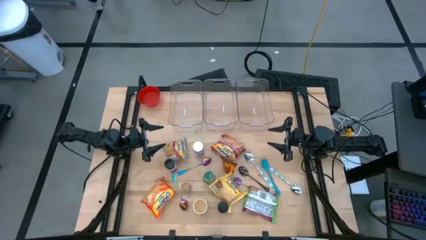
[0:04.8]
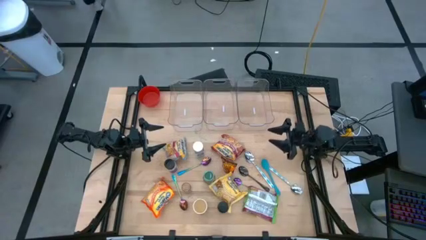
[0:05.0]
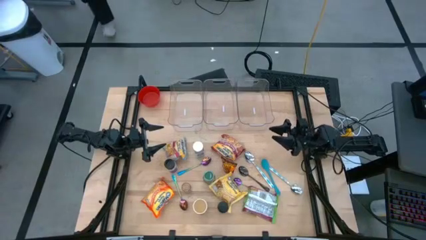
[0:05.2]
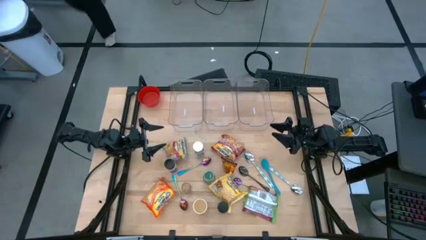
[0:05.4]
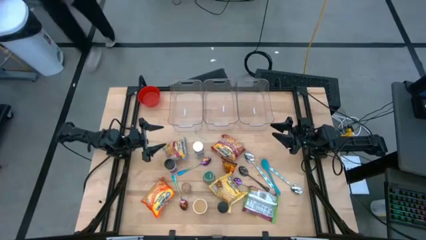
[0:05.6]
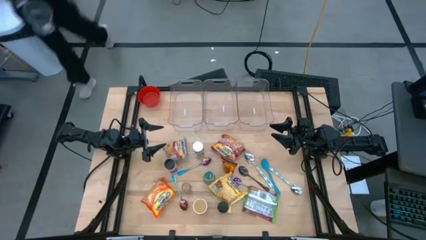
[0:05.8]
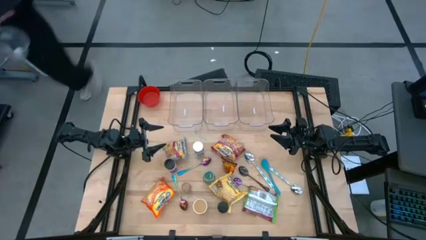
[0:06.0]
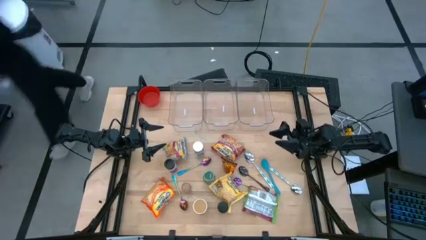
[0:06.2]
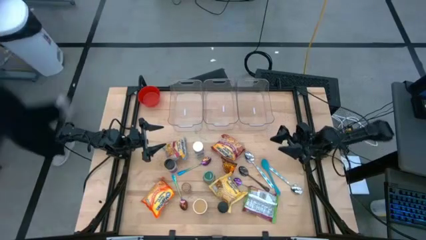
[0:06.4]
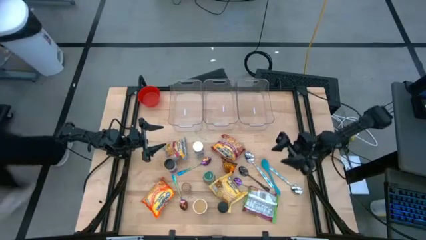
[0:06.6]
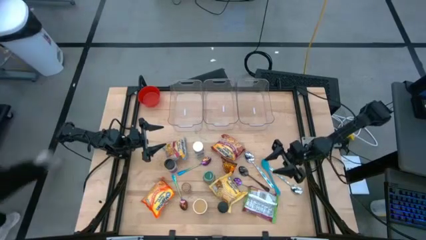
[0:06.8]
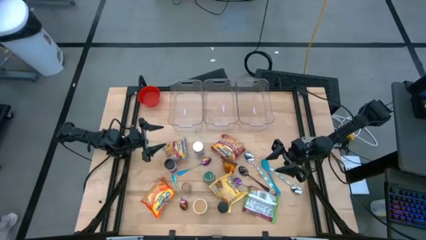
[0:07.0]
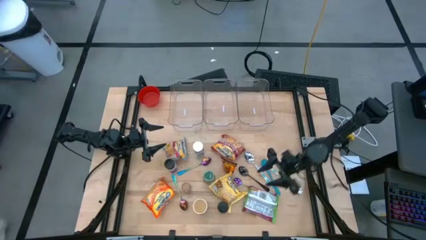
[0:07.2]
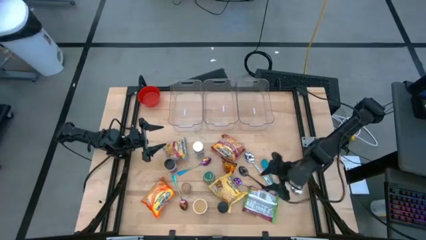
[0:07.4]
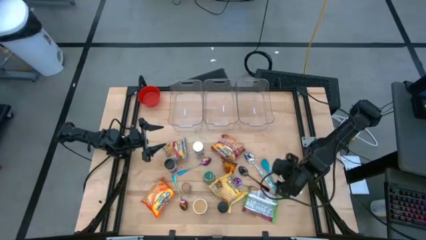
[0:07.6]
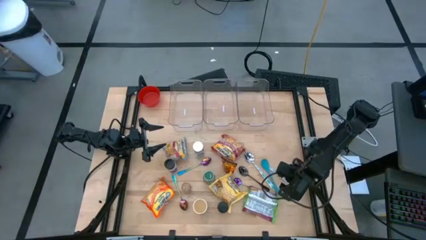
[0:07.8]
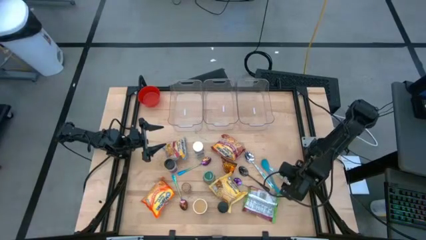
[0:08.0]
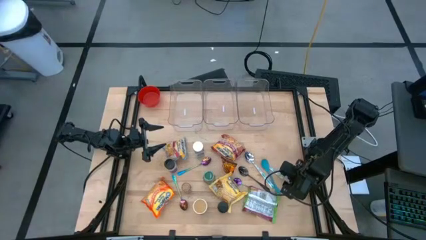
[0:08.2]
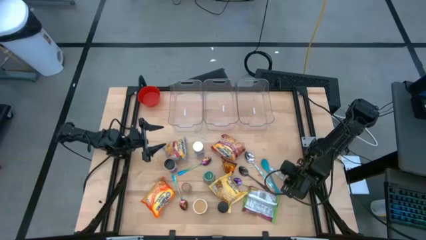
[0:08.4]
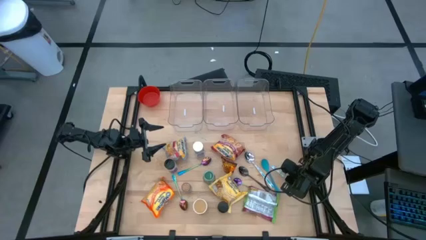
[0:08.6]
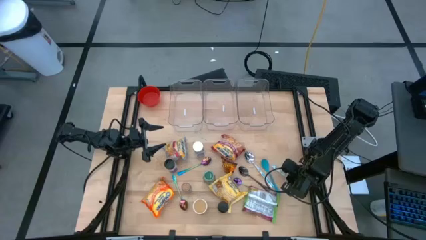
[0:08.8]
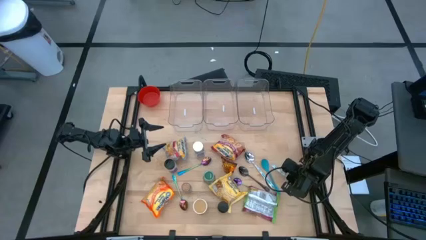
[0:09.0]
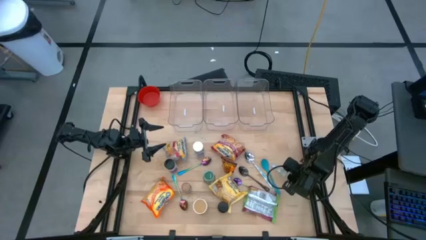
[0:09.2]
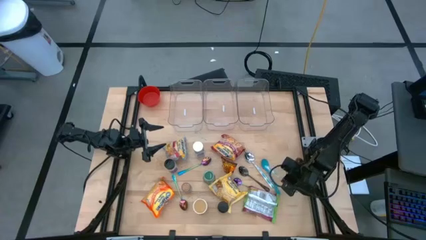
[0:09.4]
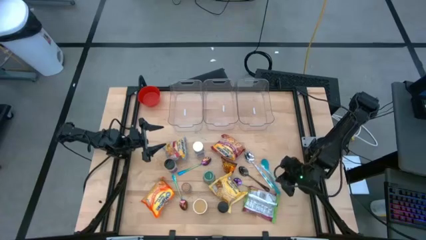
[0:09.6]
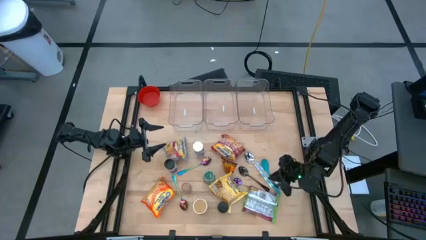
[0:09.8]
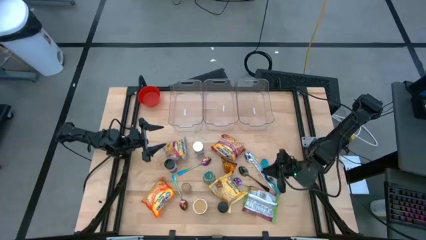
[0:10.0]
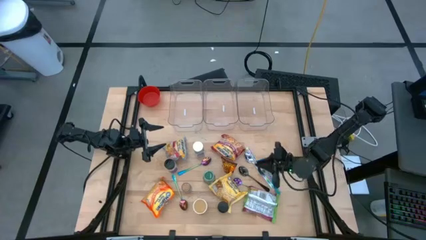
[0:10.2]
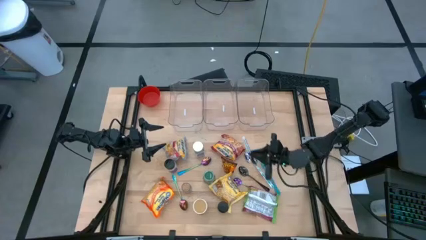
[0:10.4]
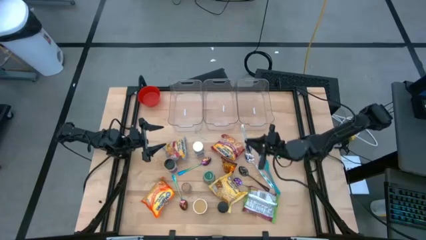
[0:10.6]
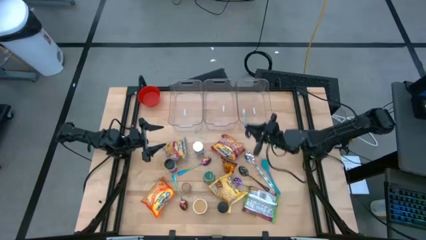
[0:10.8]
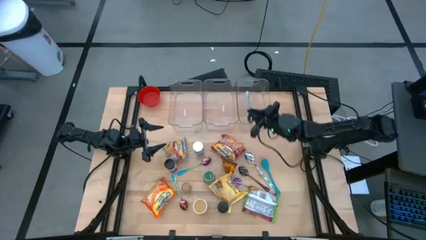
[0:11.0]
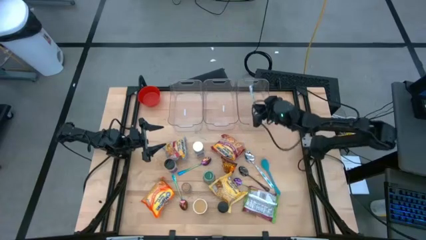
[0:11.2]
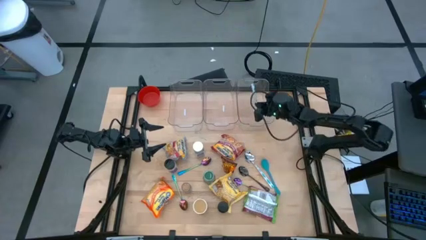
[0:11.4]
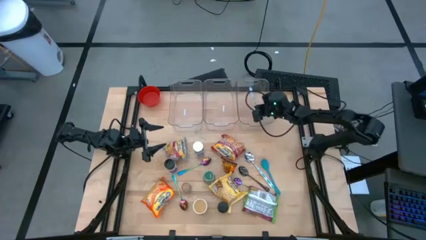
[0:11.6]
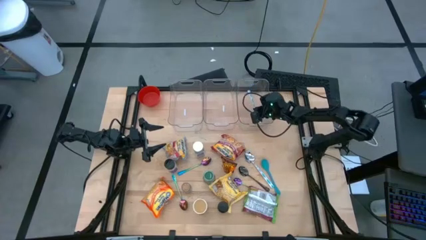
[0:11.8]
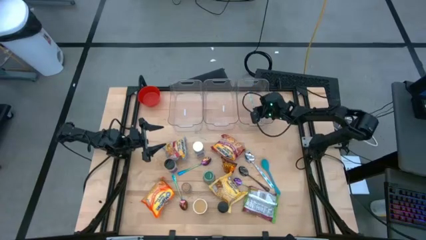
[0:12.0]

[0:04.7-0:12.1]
Task: Pick & Place Food Item
Put the right white spoon into the right transparent bin

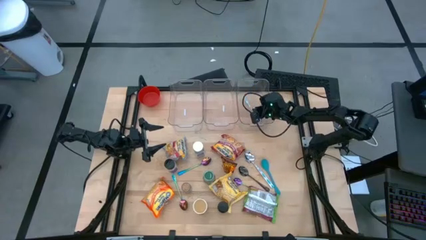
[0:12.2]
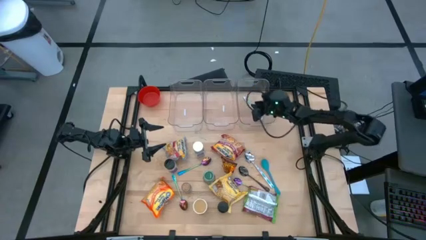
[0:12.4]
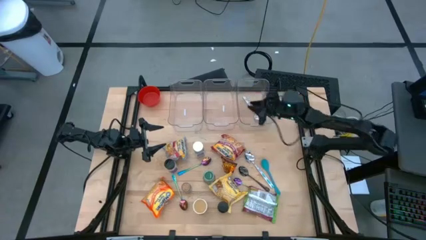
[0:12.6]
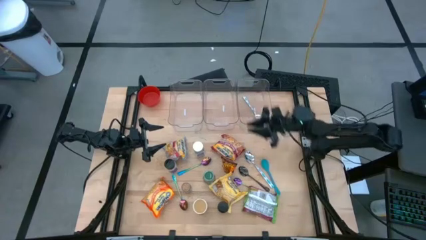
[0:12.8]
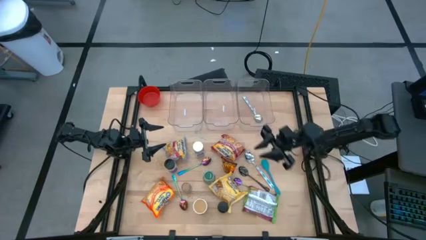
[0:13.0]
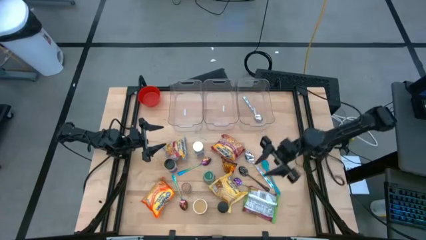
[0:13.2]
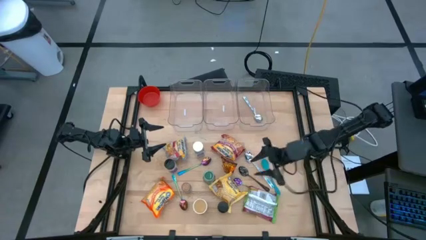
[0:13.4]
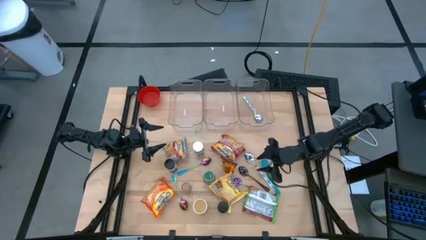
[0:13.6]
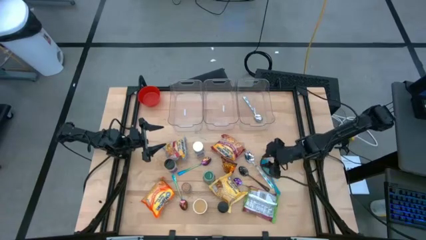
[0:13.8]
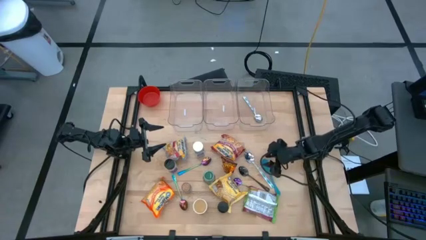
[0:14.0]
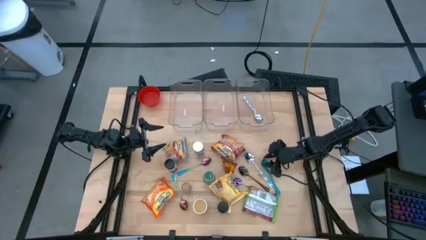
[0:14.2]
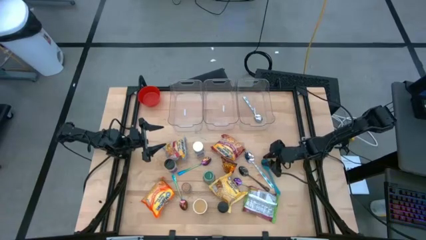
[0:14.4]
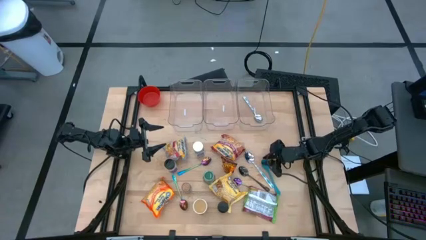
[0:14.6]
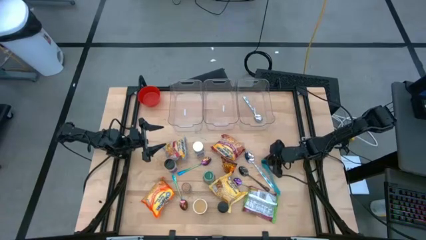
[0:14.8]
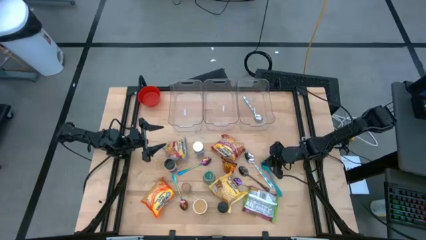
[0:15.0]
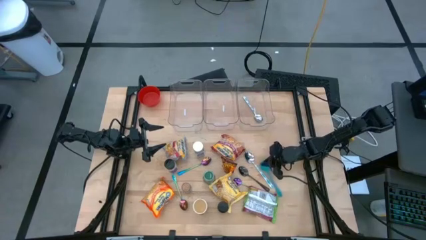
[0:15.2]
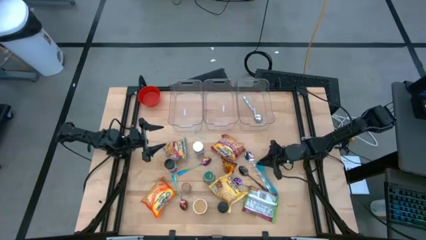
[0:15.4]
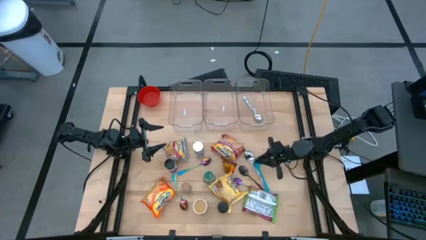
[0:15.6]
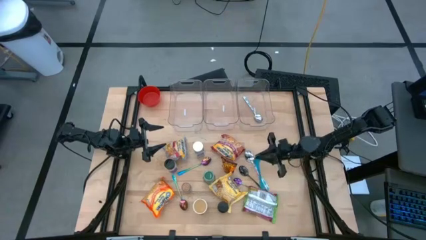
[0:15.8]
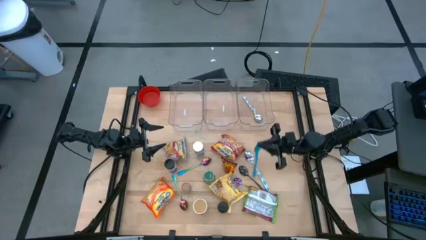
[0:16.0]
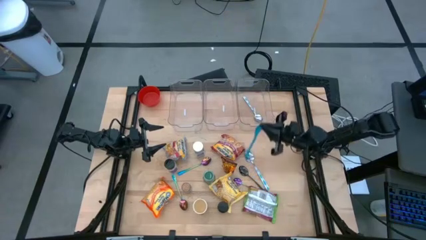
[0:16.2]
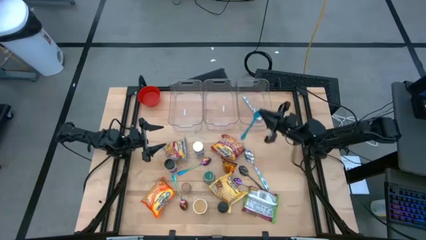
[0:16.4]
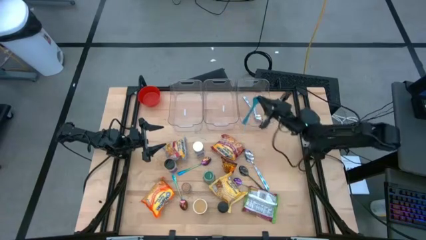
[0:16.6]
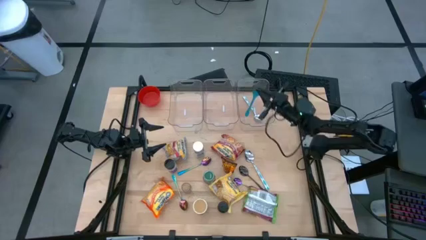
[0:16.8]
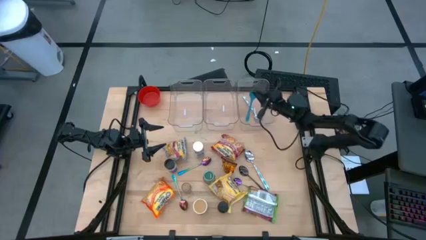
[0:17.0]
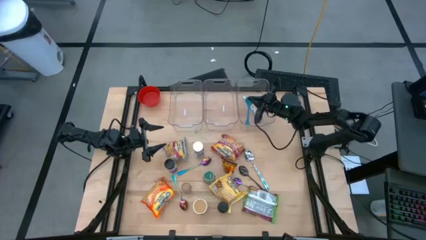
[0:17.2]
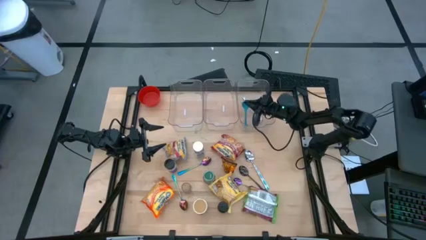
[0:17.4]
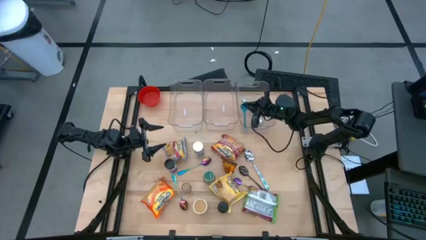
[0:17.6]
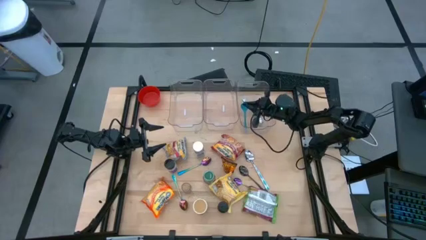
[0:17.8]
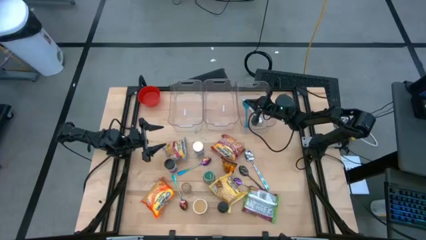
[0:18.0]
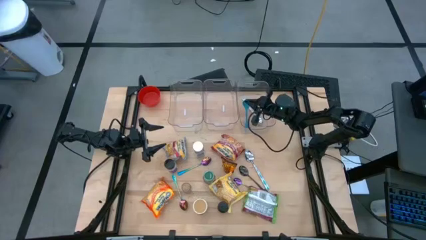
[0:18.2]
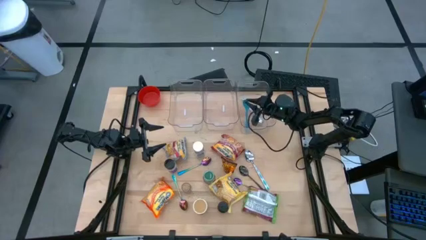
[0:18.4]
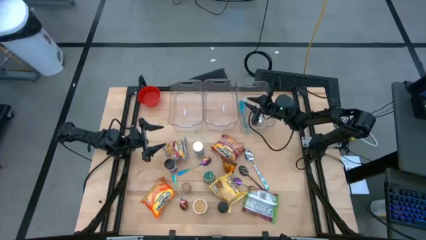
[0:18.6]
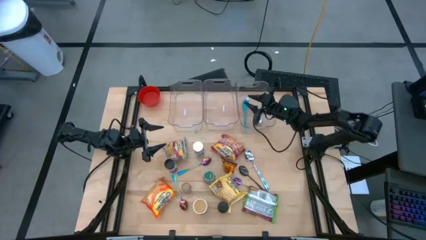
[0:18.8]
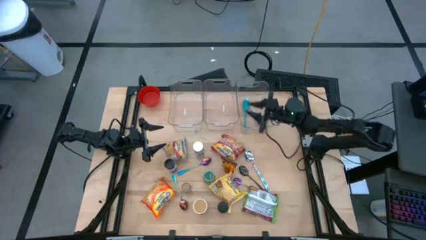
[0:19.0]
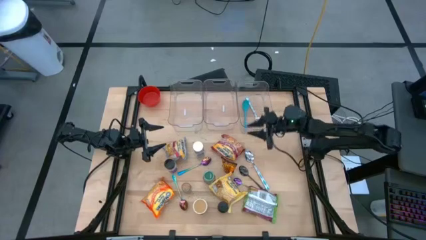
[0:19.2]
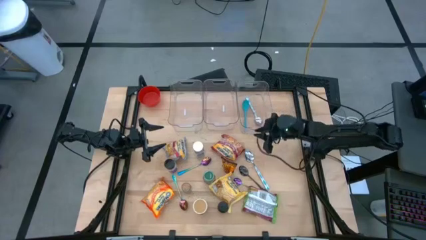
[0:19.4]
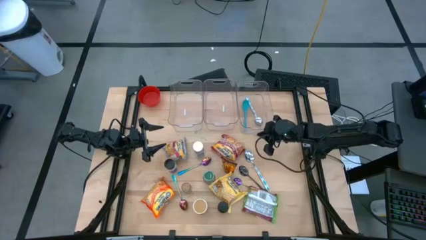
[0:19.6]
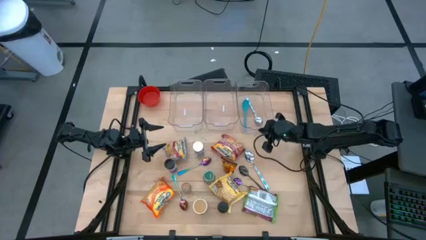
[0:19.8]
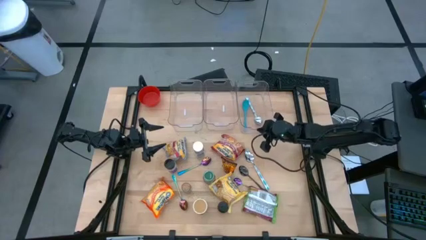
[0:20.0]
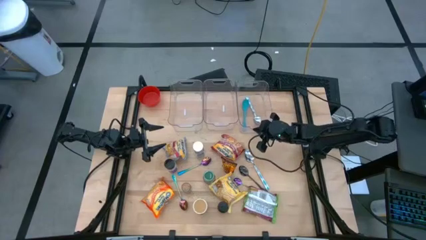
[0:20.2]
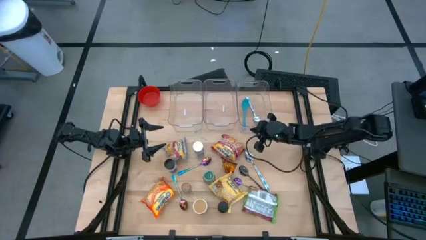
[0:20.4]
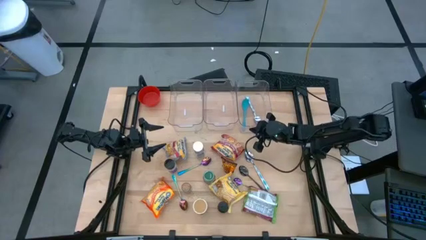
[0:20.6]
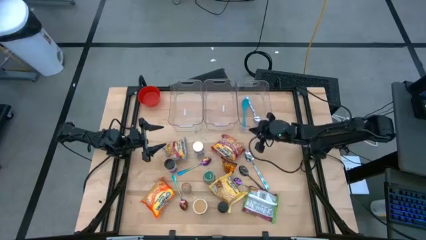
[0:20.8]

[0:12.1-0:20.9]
Put the blue baby spoon into the right transparent bin
